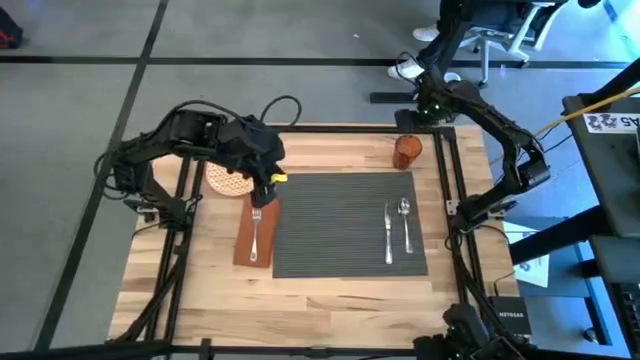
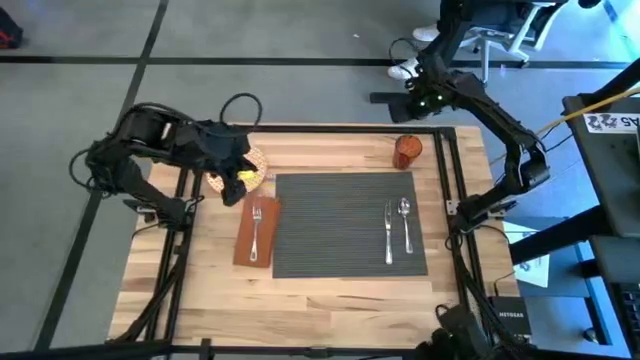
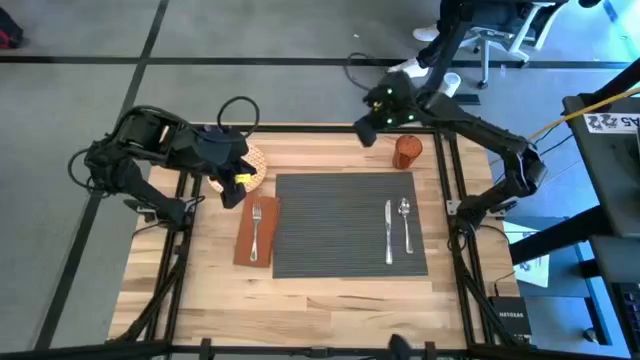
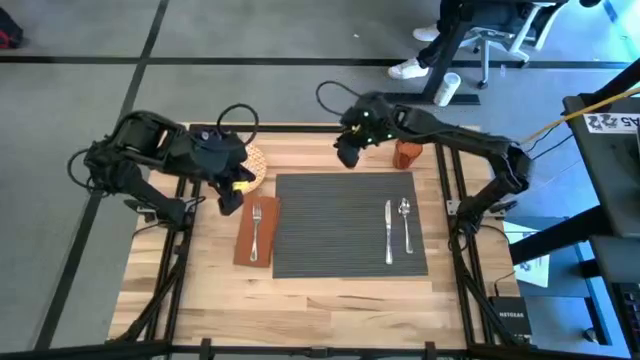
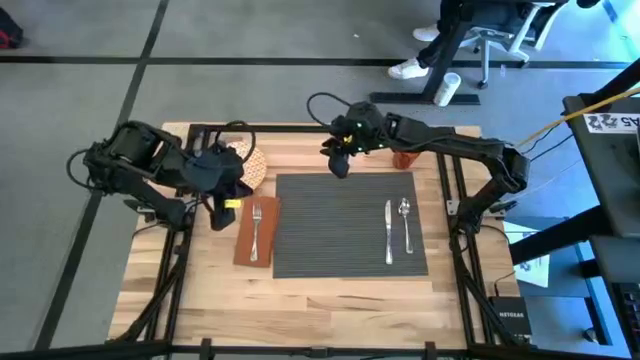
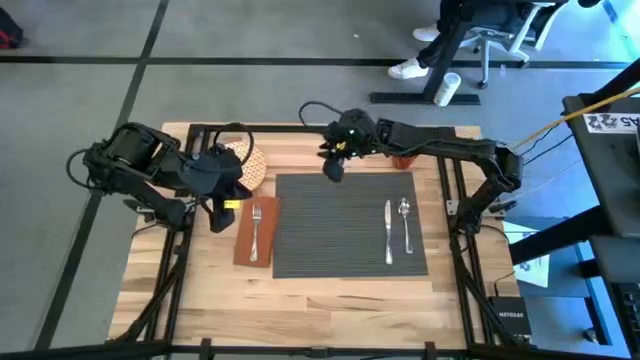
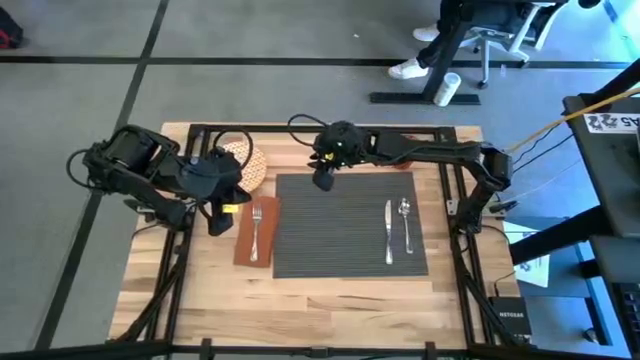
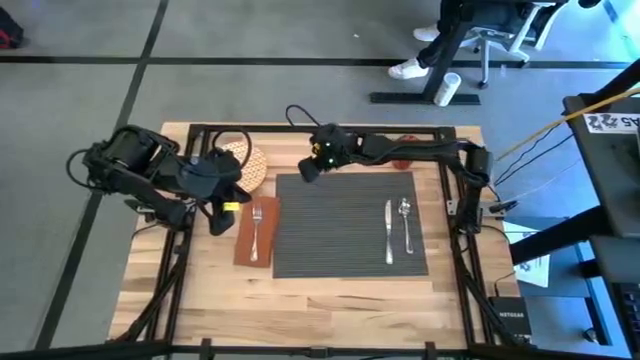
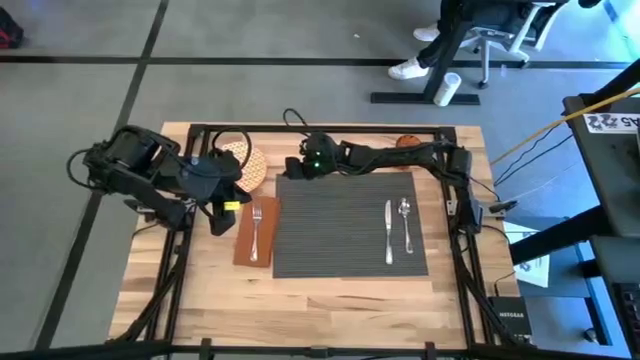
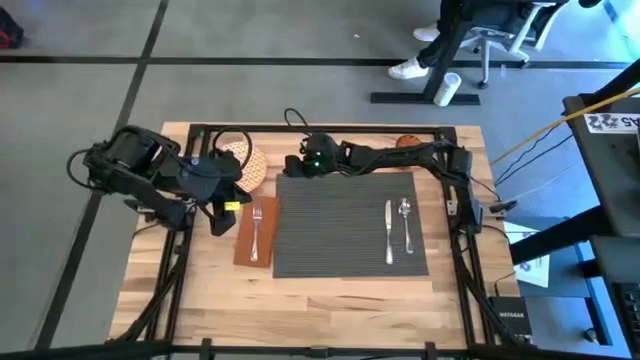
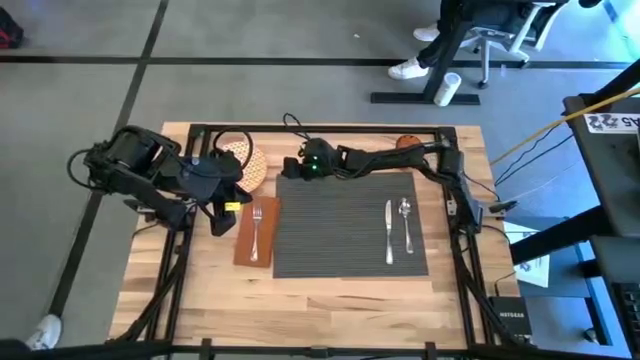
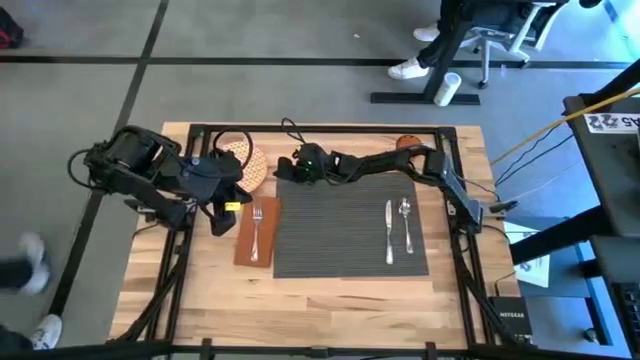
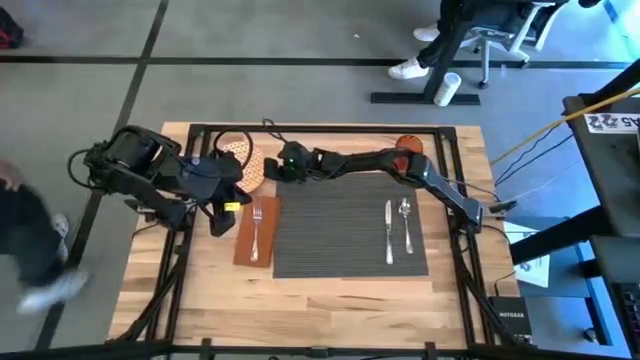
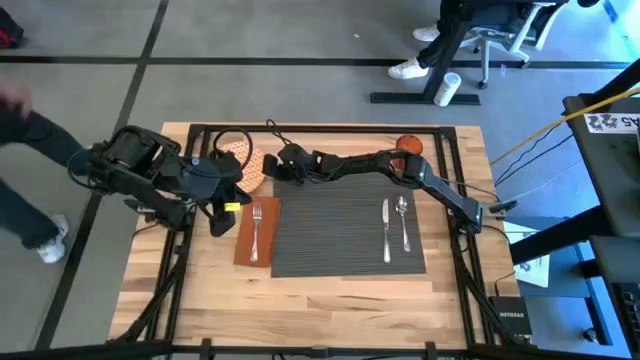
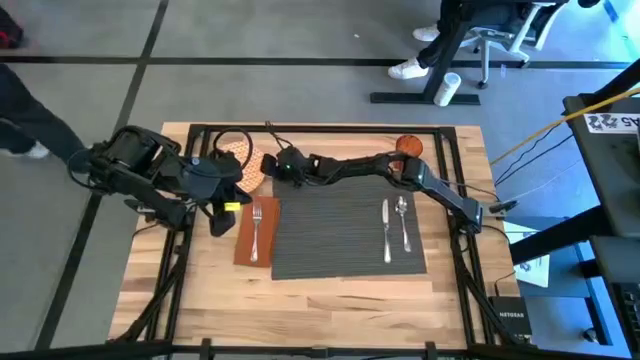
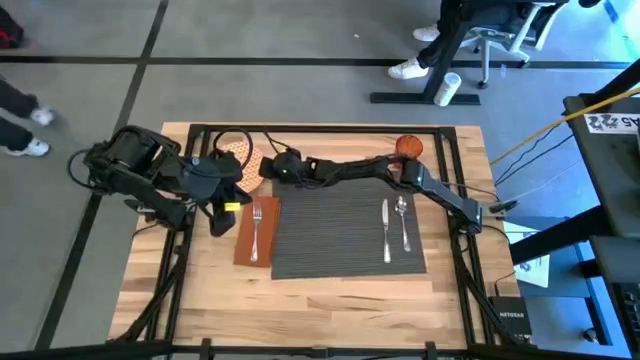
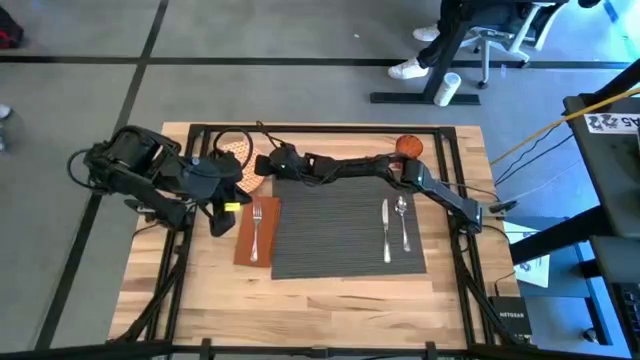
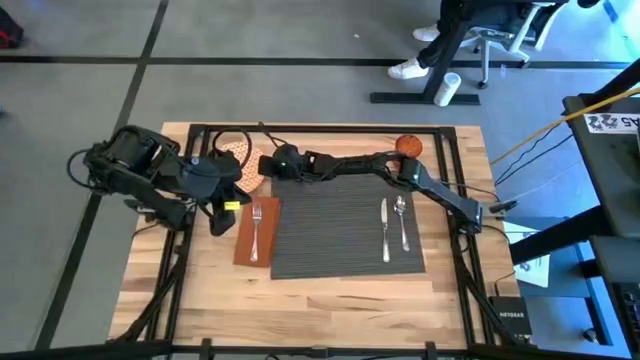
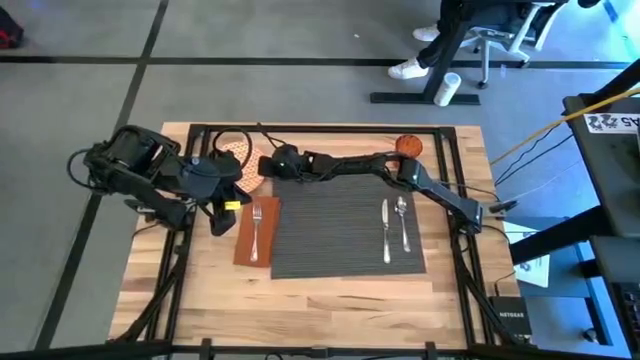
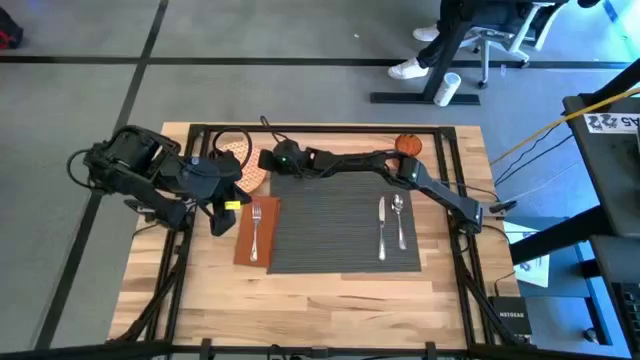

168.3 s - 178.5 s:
Task: Set table place
Put the orange plate on the gray tablemat

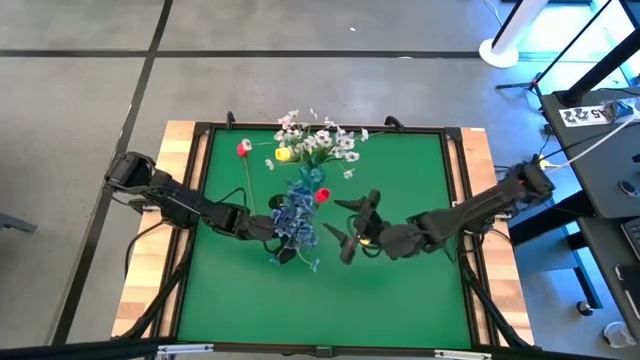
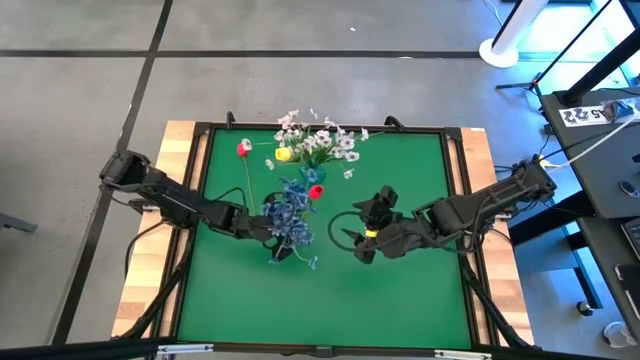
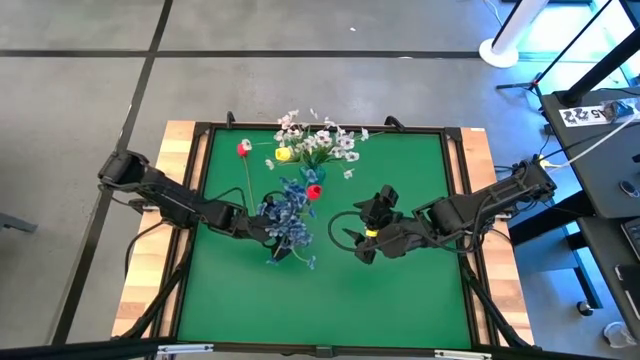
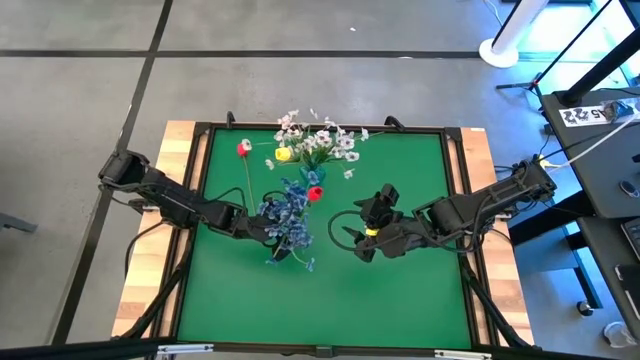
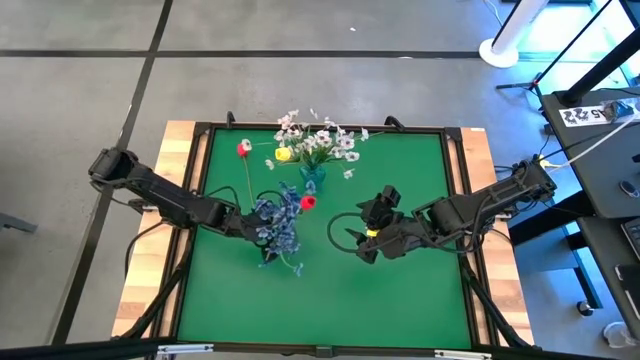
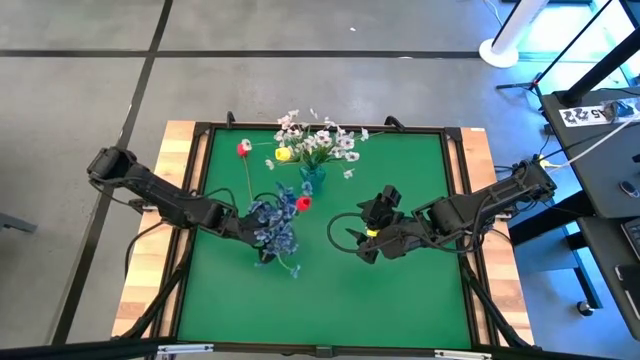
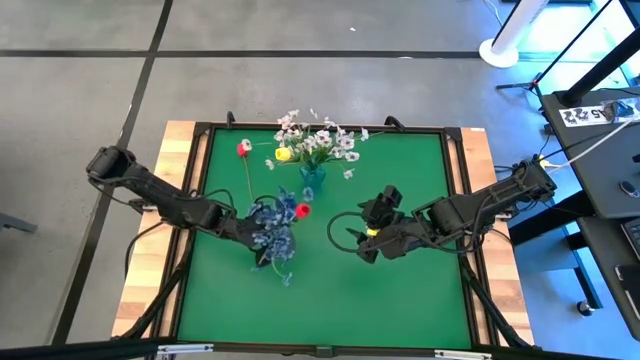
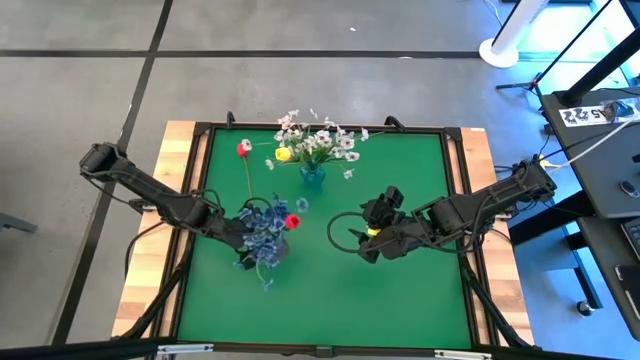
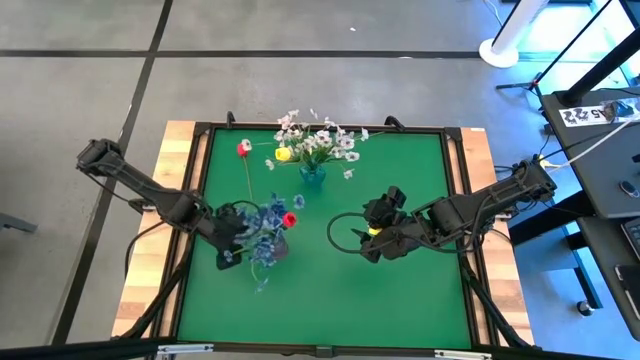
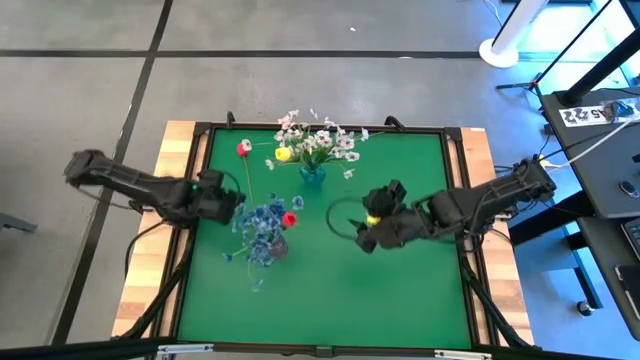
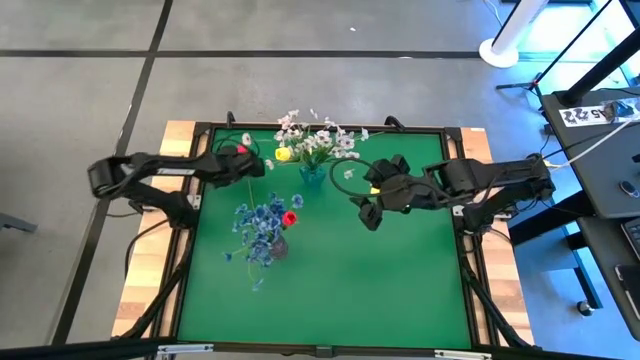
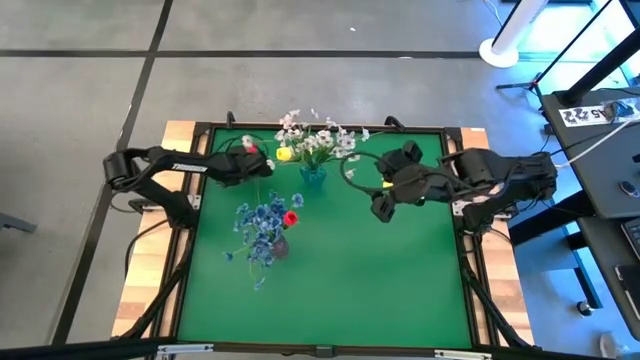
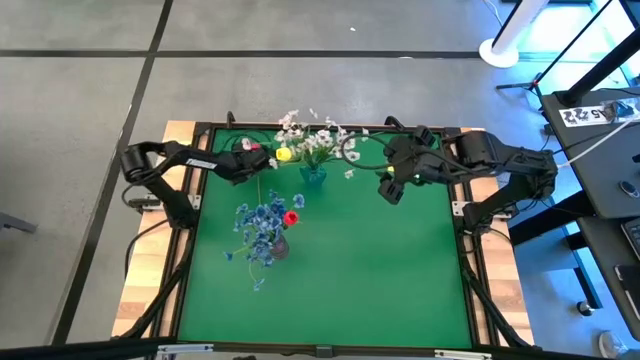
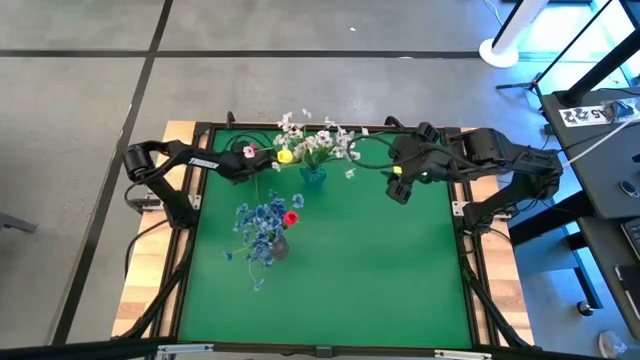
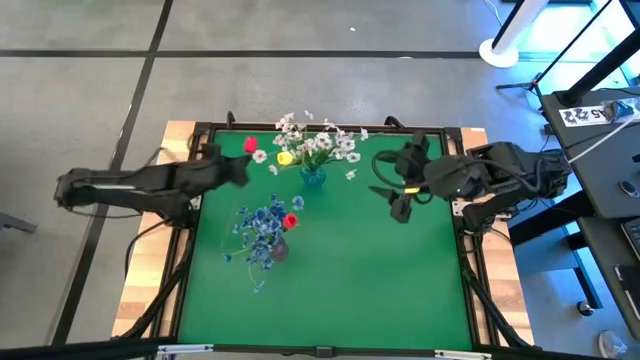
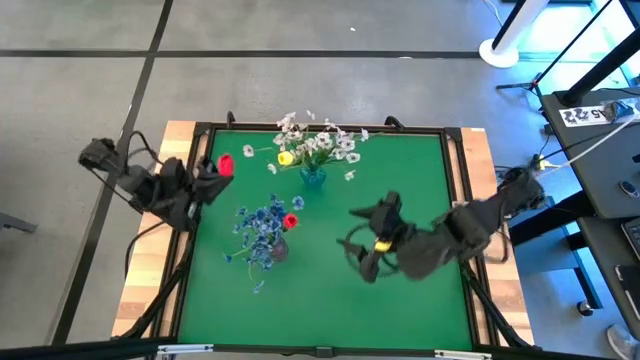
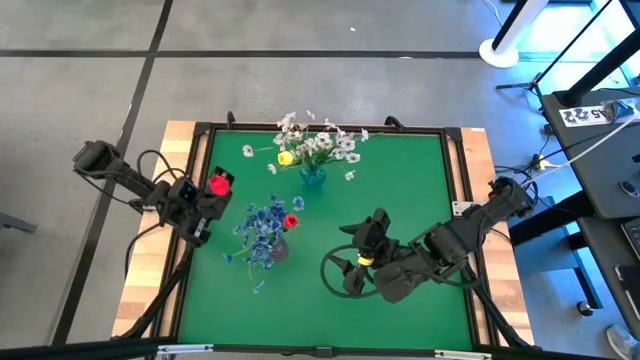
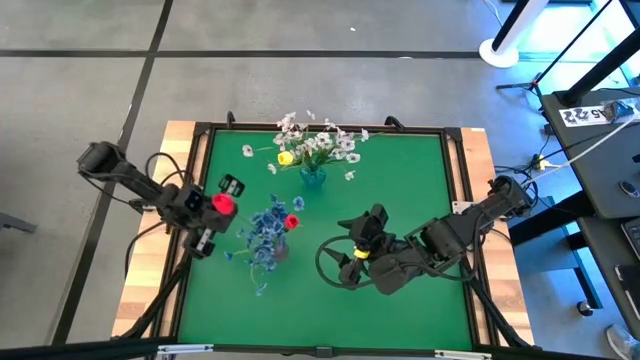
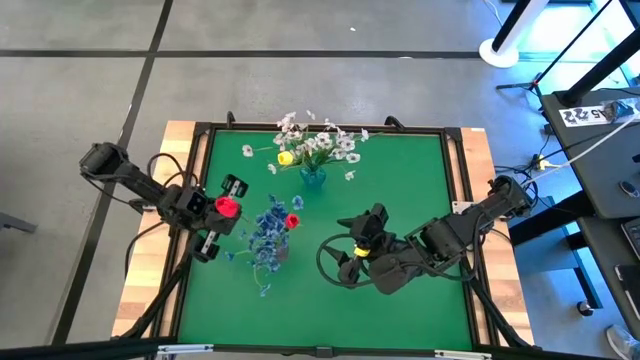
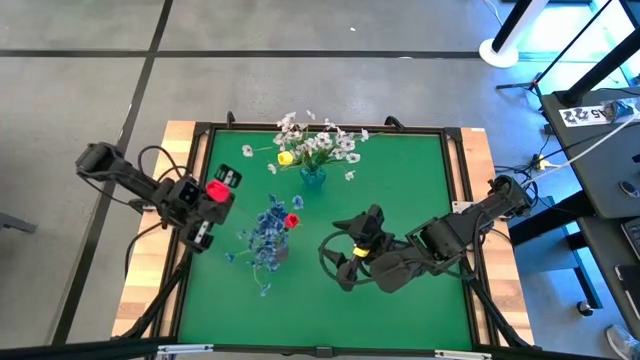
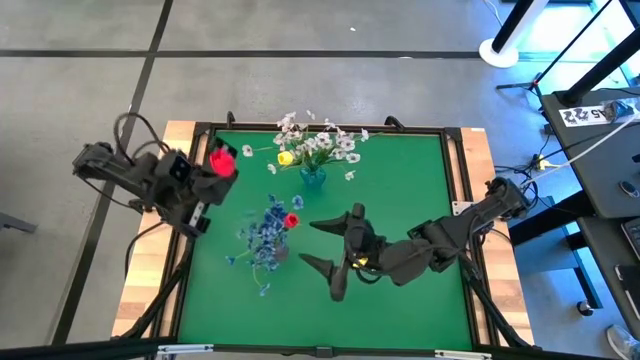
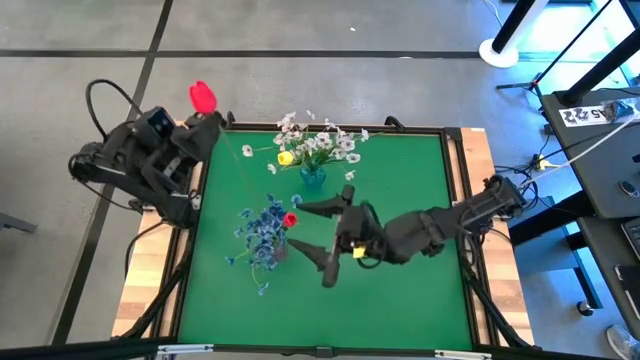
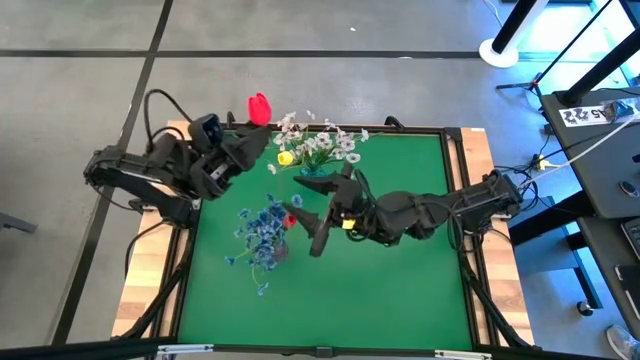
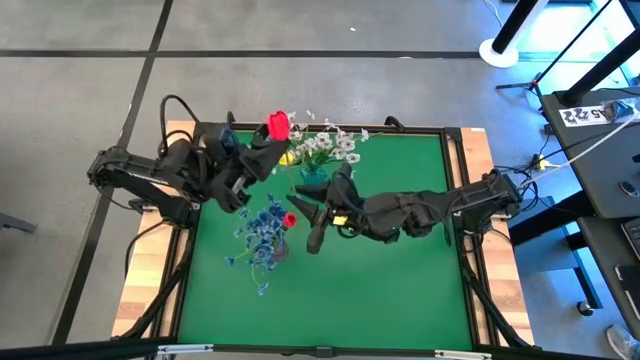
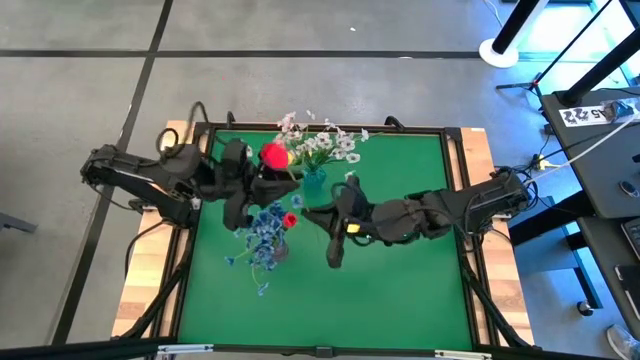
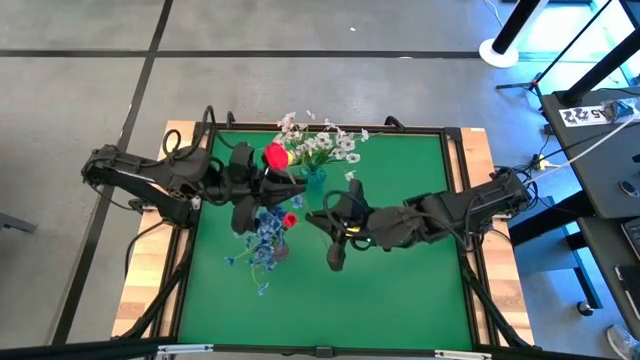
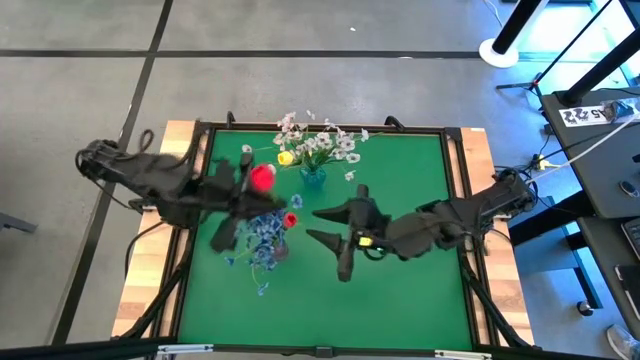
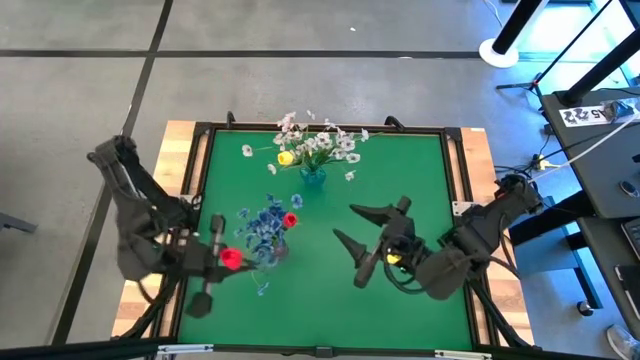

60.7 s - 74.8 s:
Task: Sort flowers into vase by color
Put the red flowers into the violet vase
